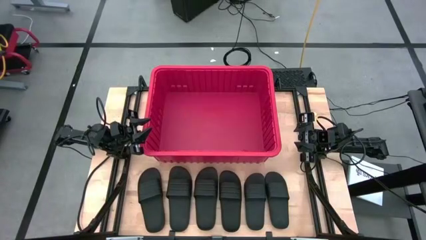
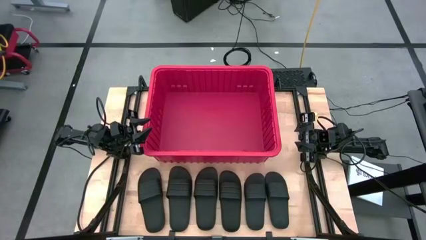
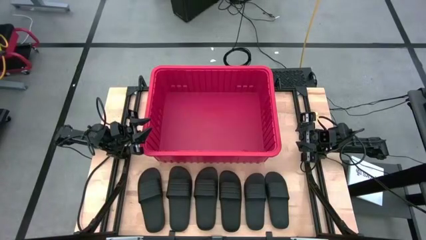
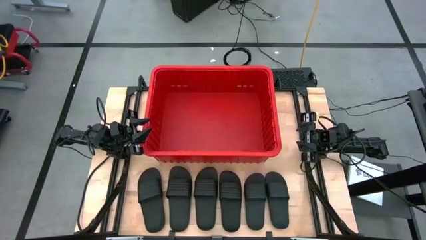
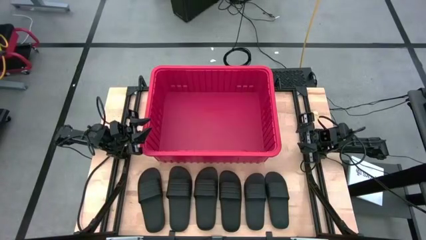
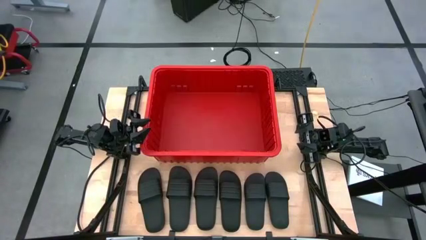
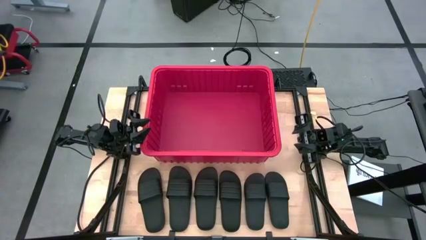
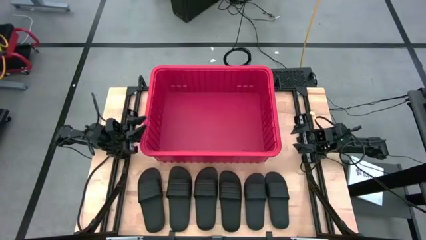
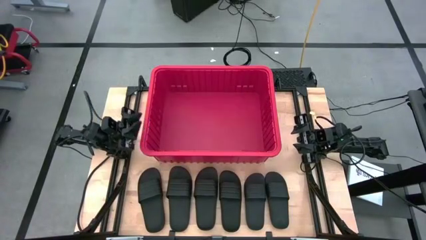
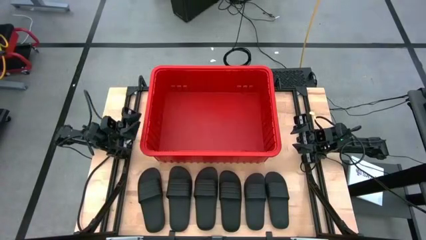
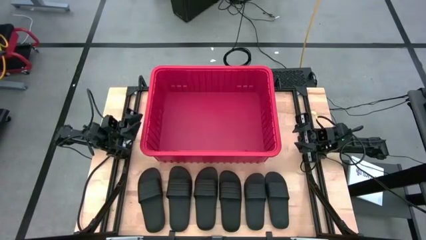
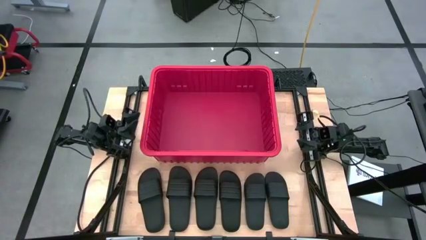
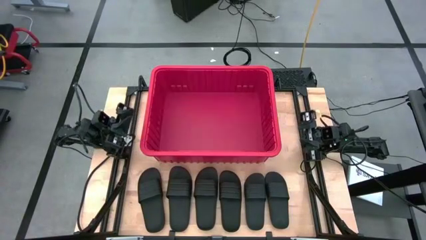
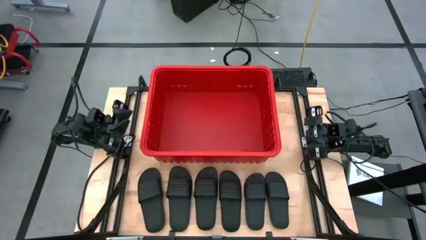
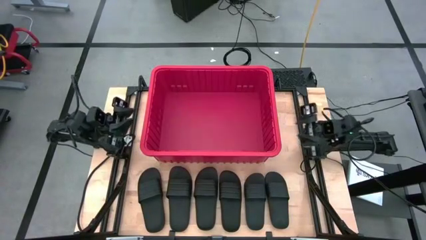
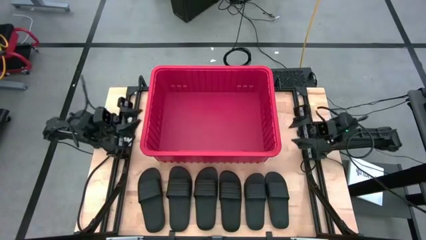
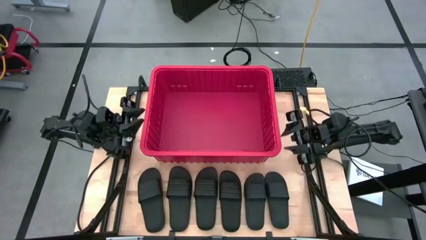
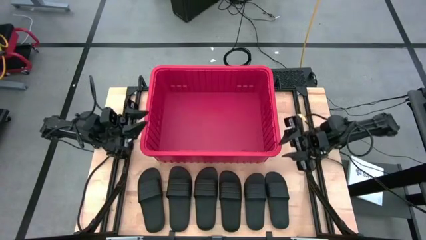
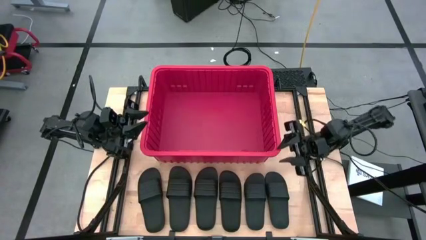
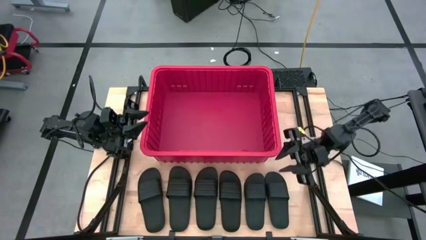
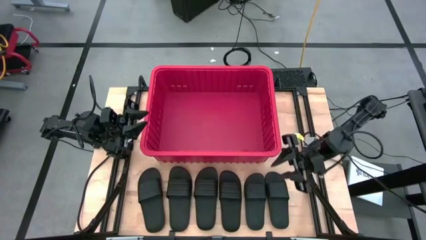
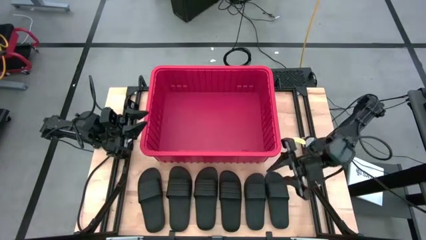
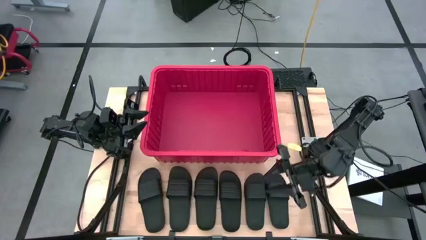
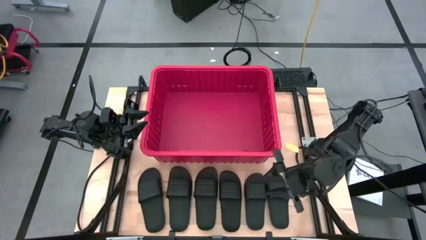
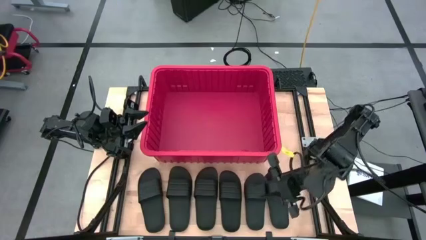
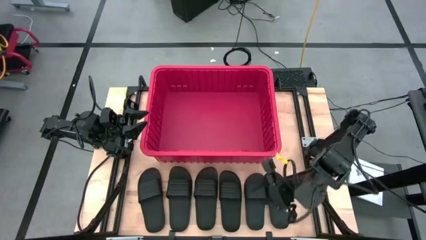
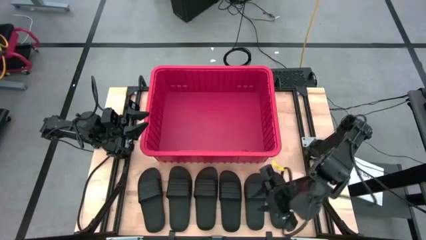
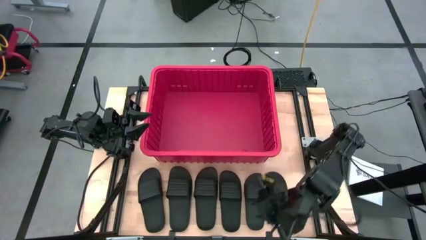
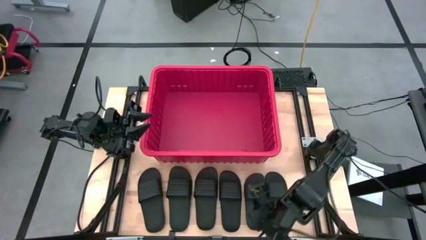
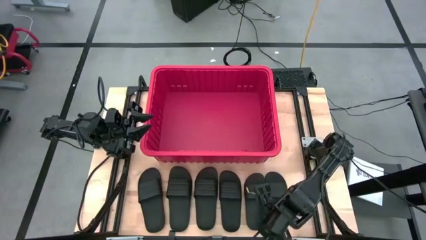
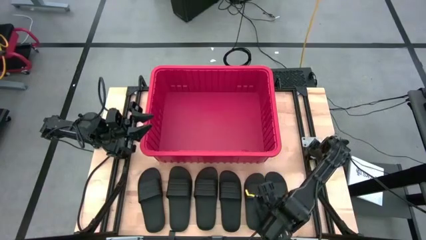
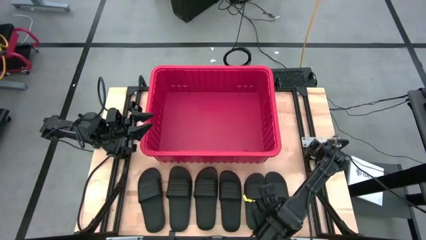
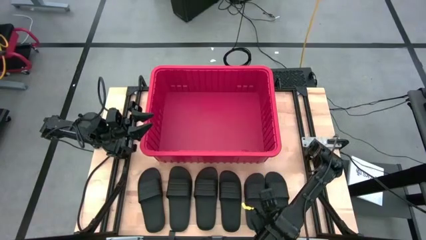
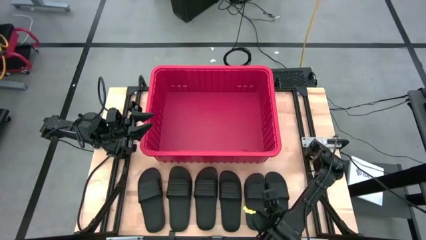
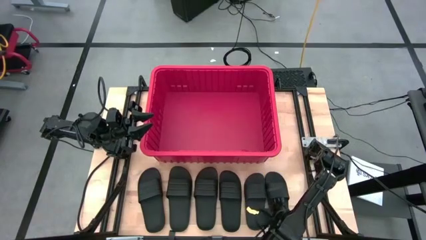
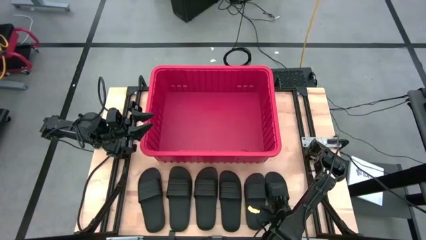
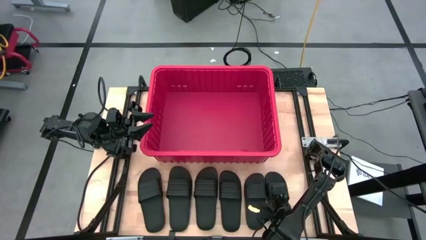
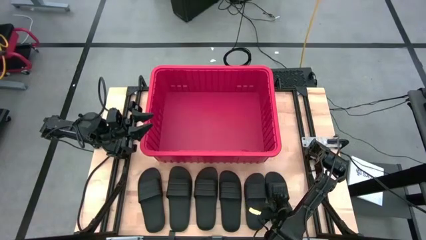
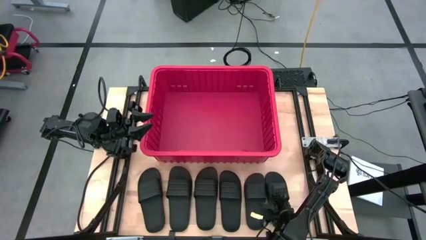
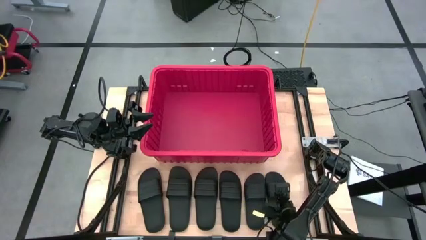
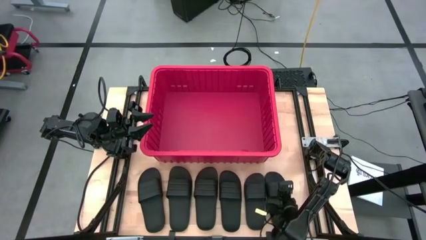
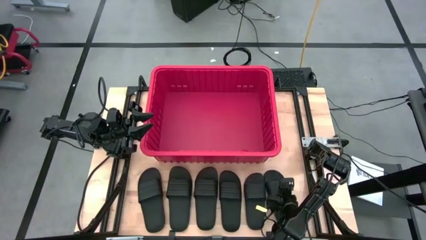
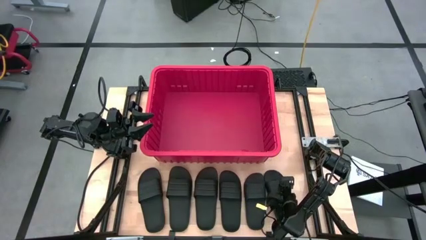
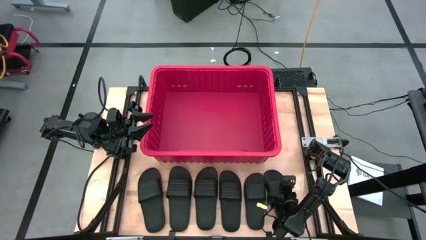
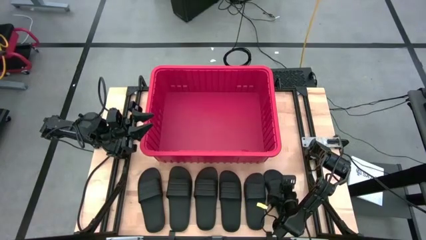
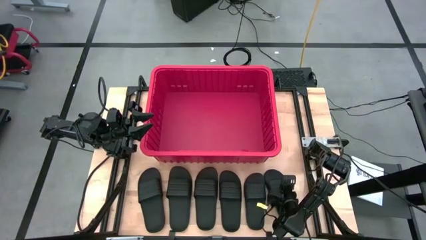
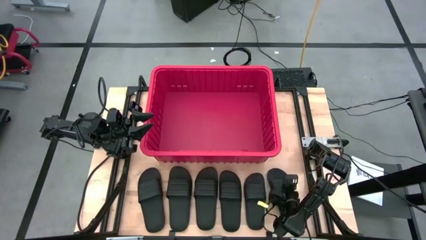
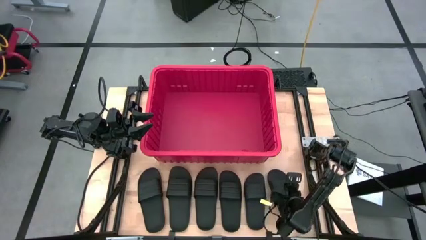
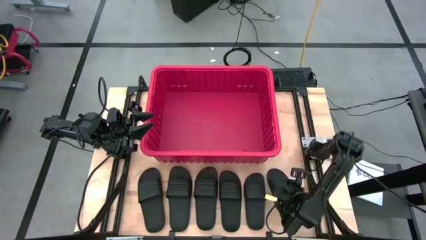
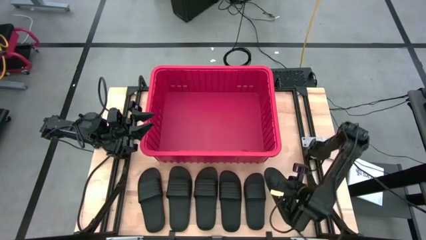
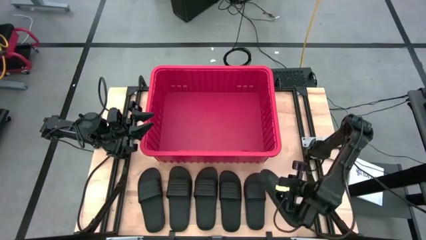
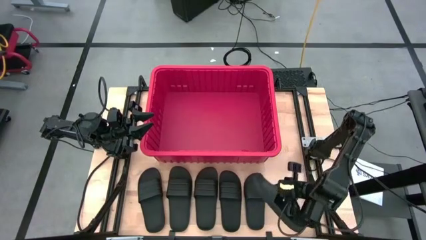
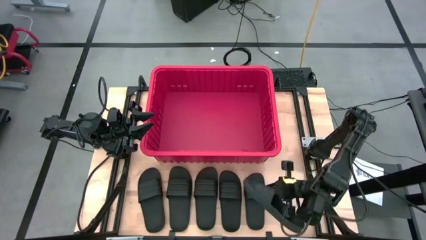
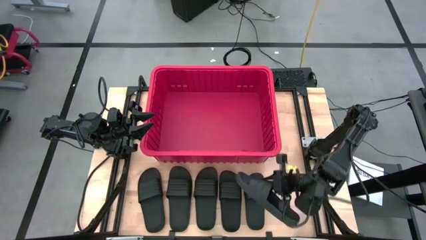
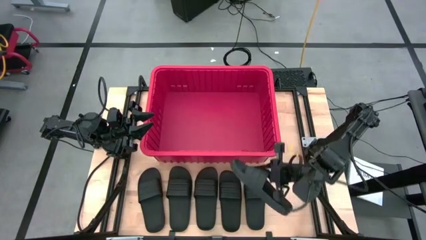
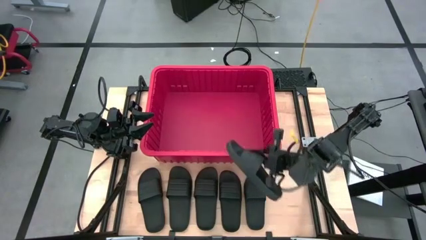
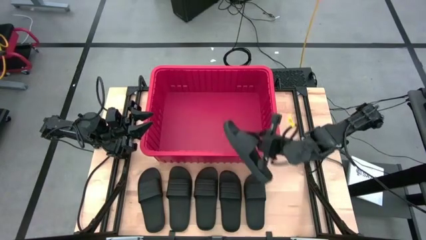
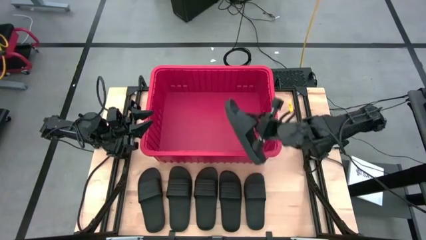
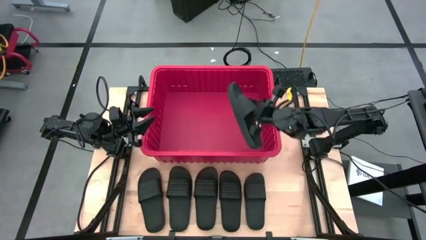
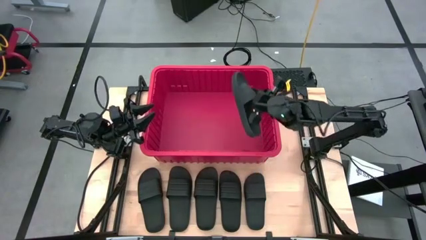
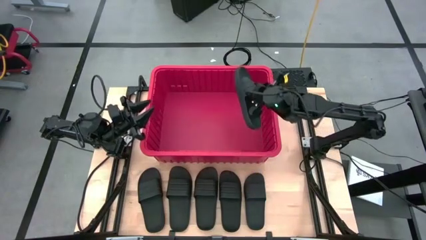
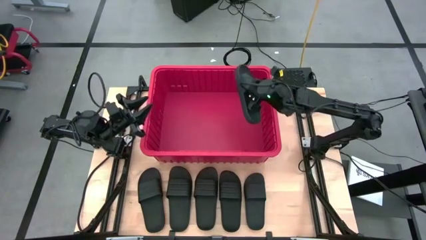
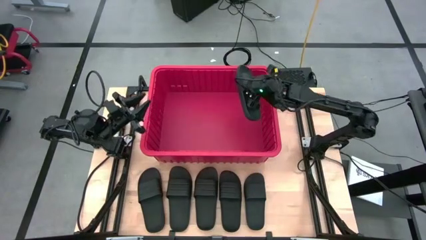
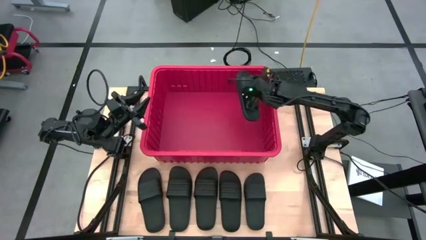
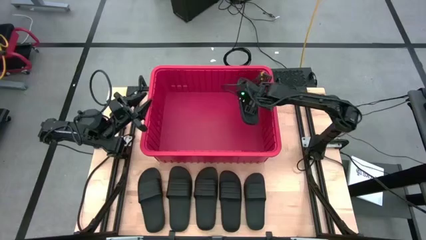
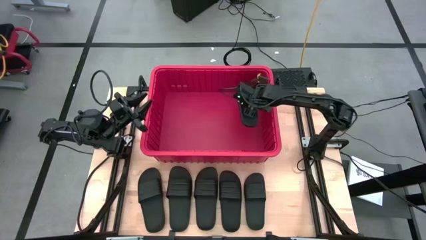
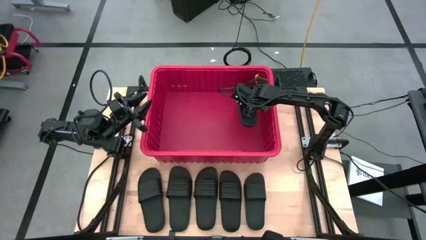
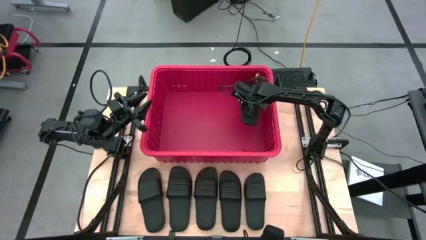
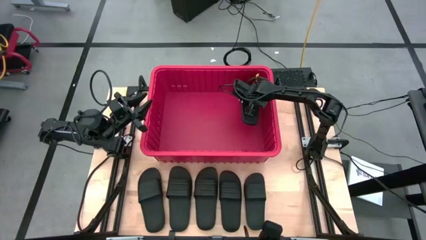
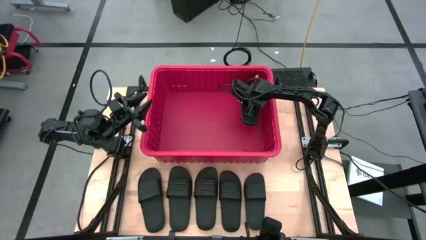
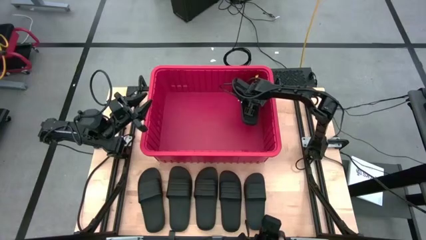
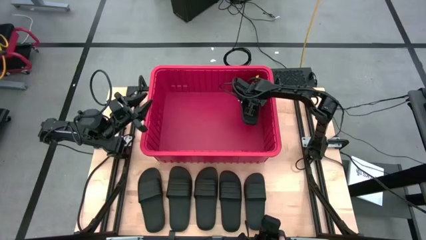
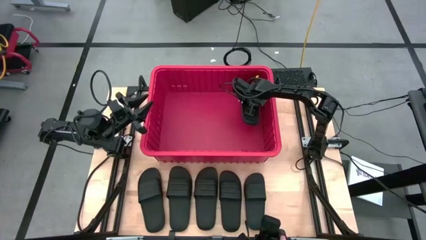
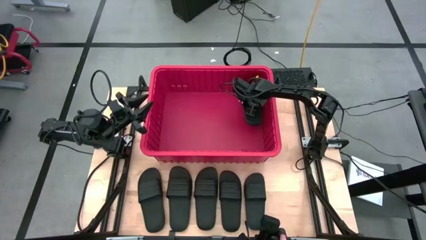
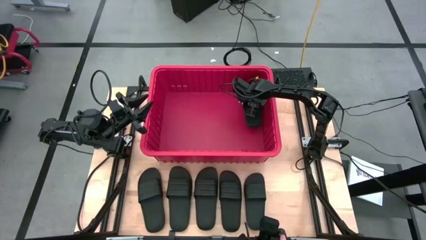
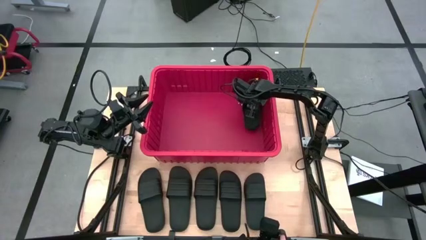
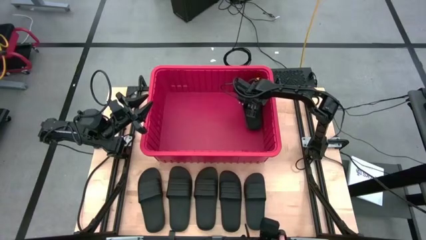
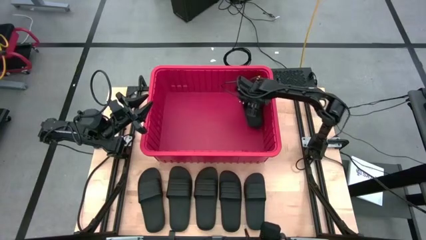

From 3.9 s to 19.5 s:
Task: Pick and place slides into bin
Put the black slide into the red bin
